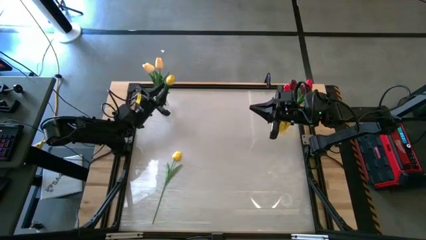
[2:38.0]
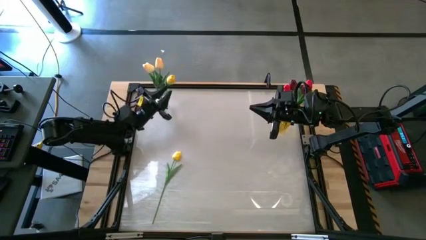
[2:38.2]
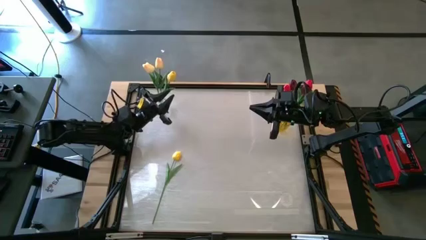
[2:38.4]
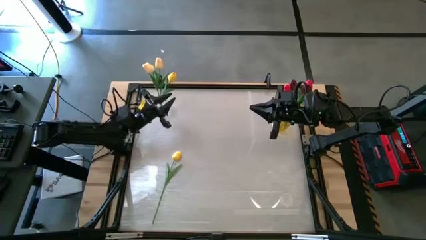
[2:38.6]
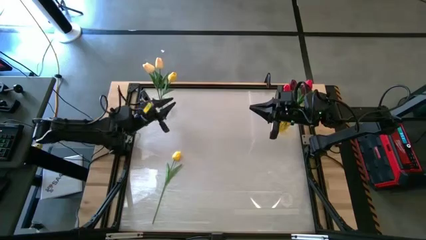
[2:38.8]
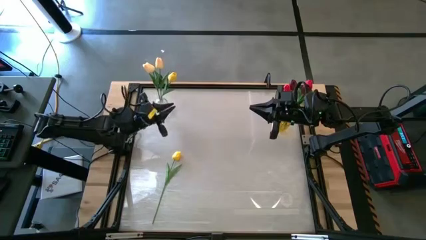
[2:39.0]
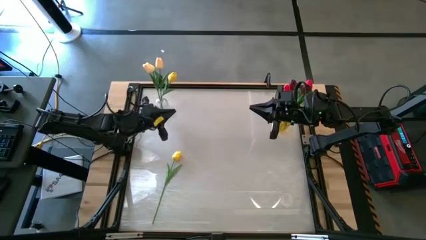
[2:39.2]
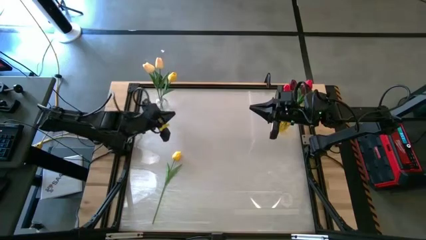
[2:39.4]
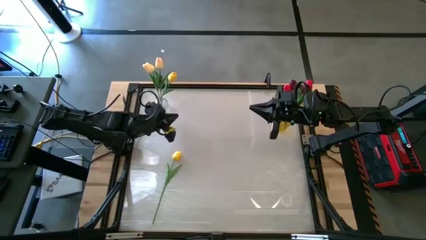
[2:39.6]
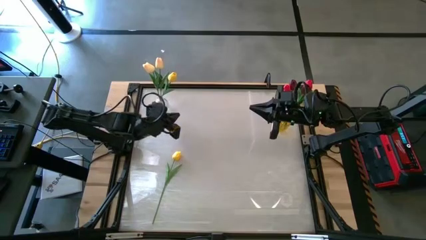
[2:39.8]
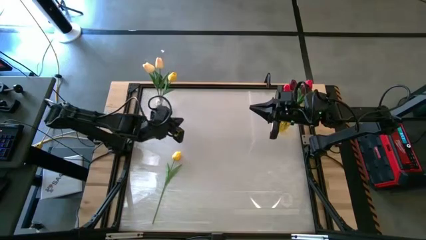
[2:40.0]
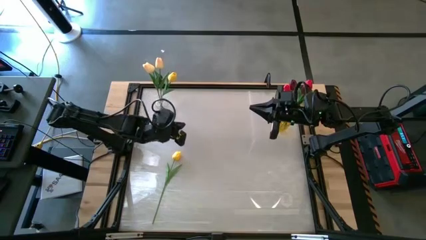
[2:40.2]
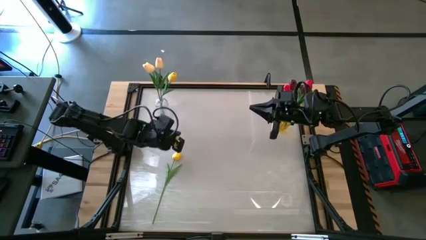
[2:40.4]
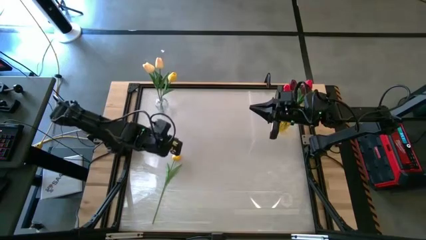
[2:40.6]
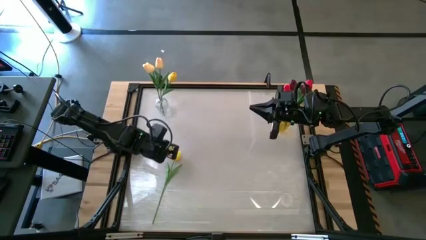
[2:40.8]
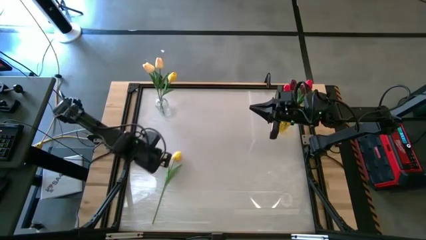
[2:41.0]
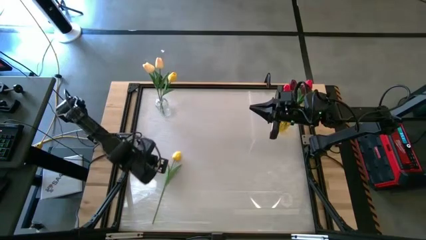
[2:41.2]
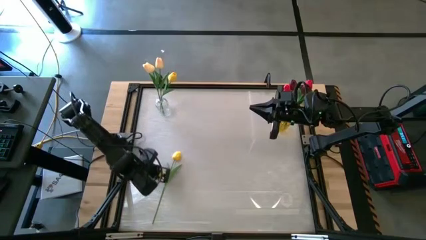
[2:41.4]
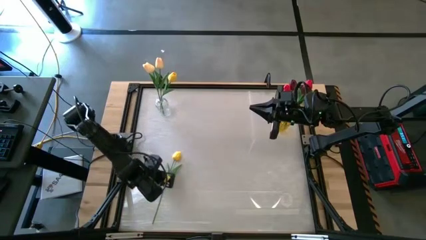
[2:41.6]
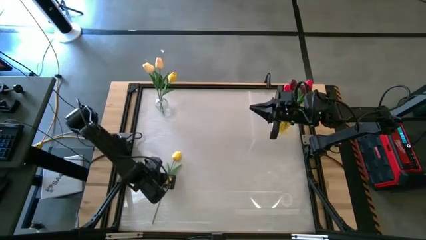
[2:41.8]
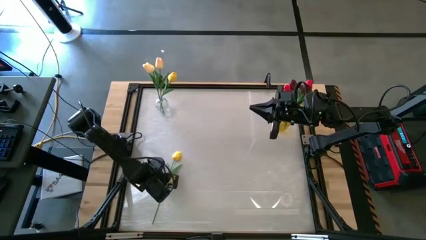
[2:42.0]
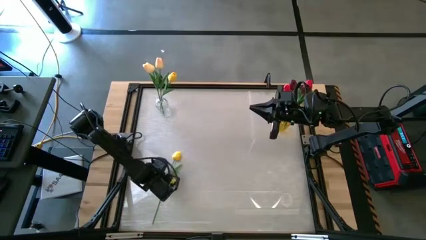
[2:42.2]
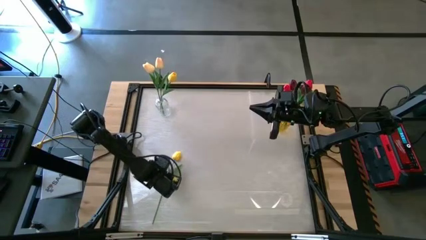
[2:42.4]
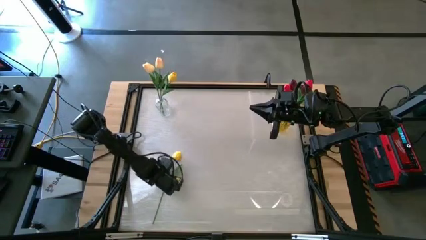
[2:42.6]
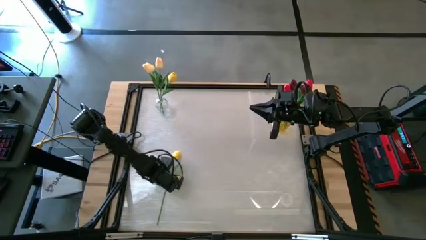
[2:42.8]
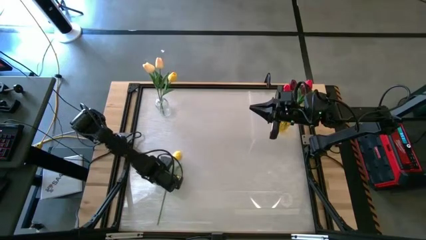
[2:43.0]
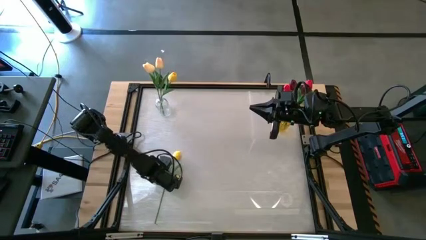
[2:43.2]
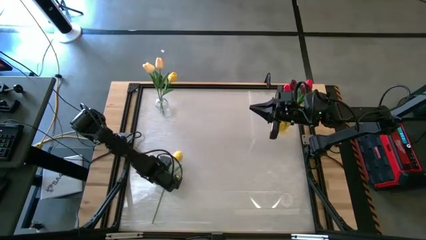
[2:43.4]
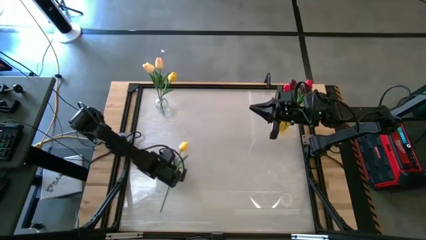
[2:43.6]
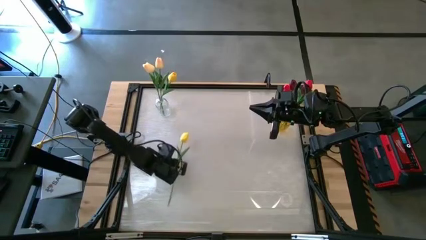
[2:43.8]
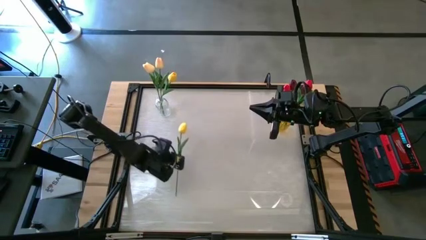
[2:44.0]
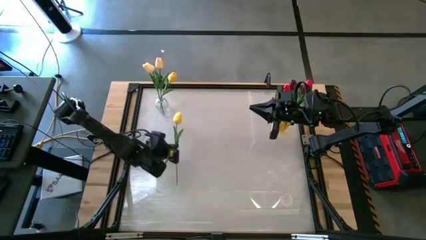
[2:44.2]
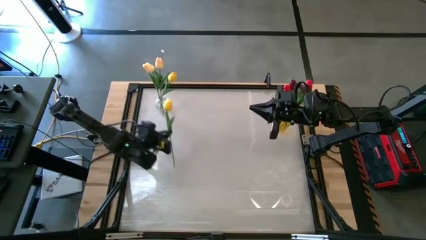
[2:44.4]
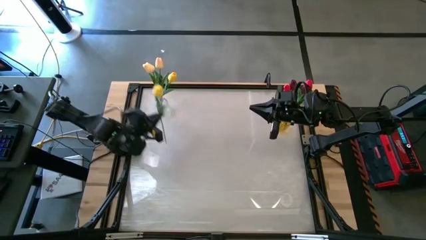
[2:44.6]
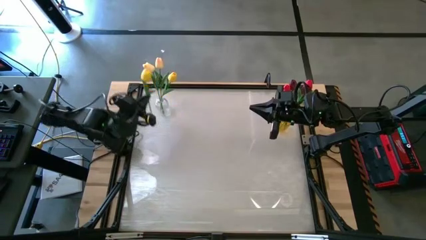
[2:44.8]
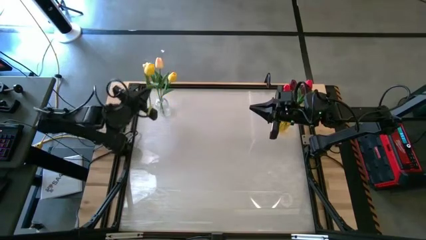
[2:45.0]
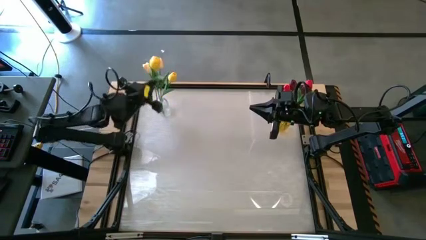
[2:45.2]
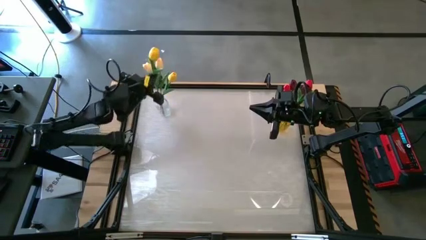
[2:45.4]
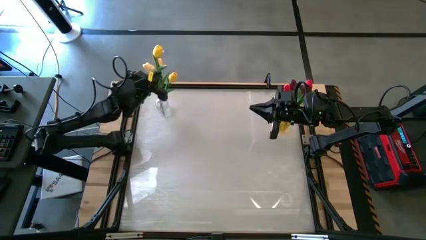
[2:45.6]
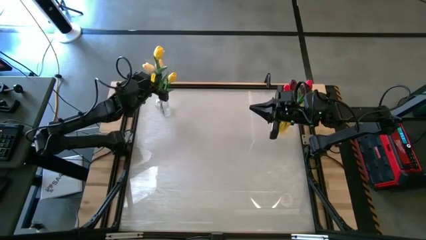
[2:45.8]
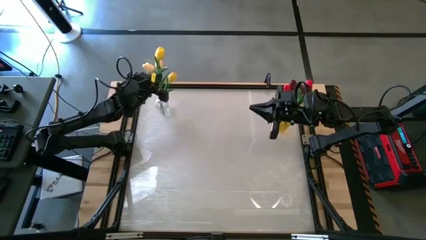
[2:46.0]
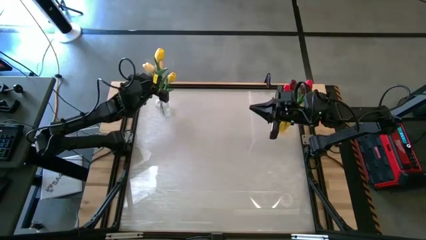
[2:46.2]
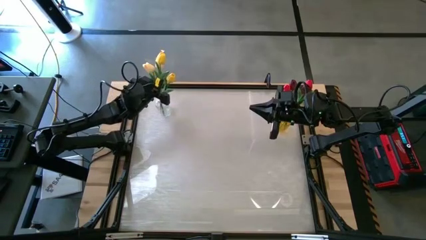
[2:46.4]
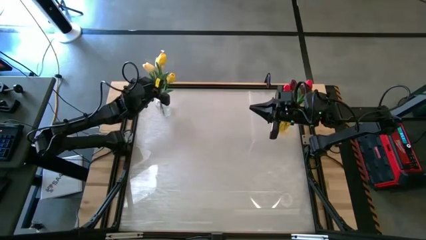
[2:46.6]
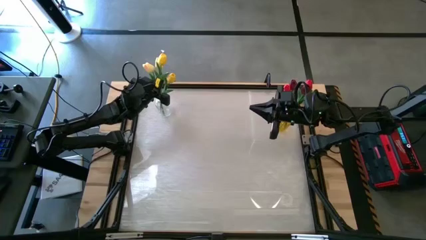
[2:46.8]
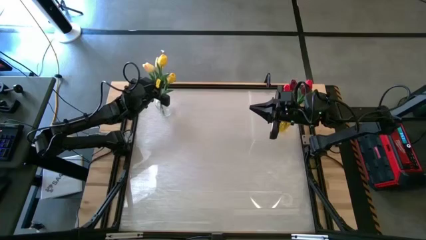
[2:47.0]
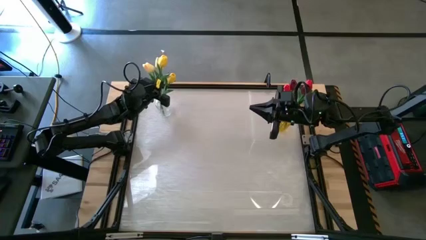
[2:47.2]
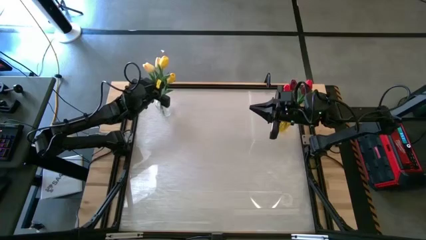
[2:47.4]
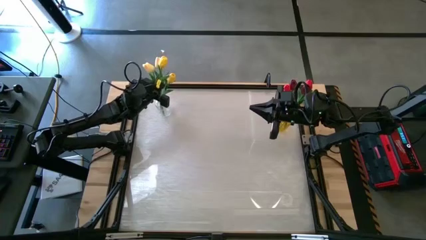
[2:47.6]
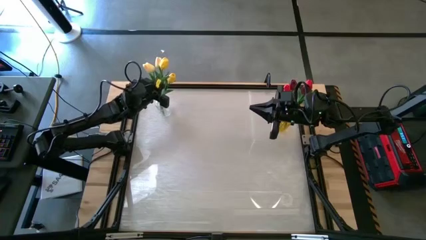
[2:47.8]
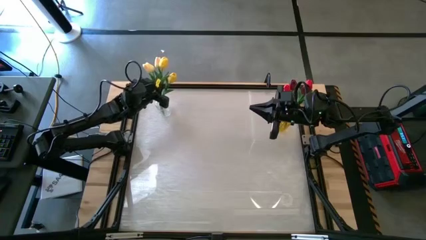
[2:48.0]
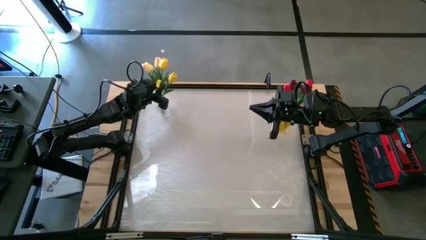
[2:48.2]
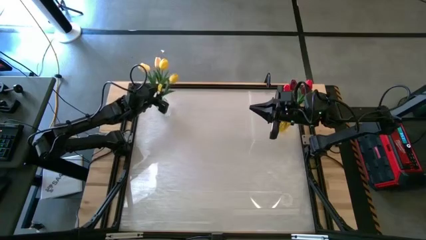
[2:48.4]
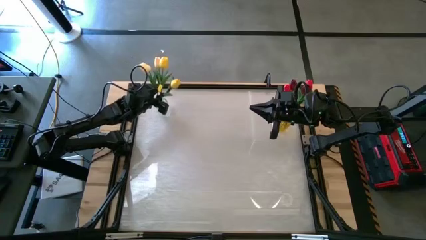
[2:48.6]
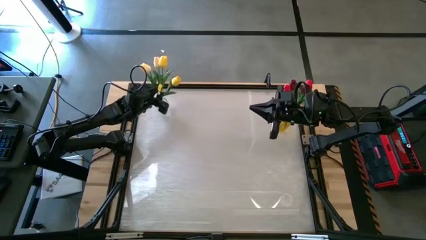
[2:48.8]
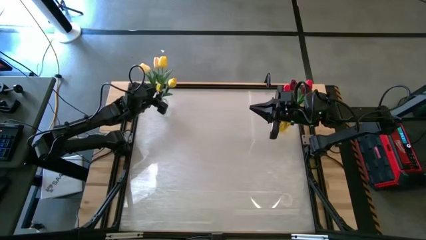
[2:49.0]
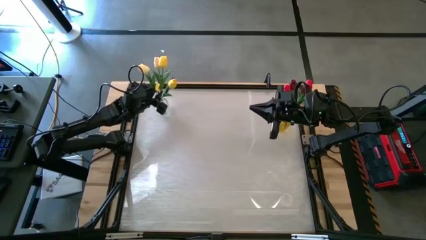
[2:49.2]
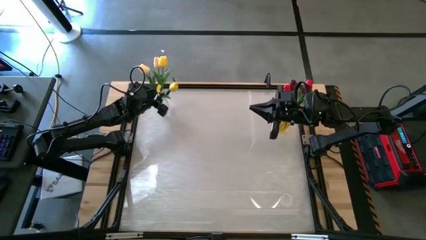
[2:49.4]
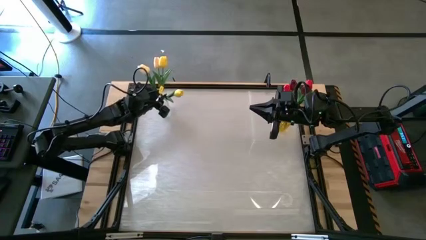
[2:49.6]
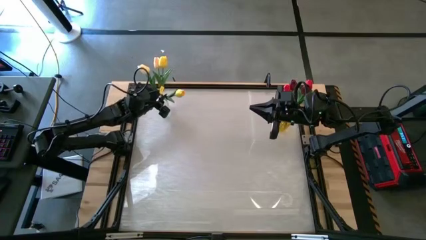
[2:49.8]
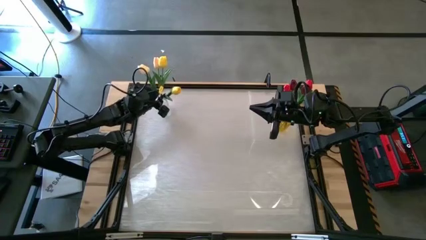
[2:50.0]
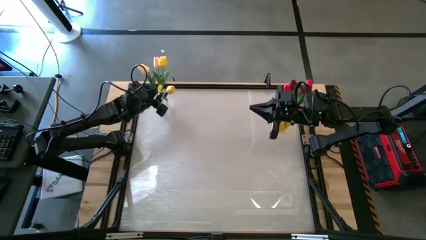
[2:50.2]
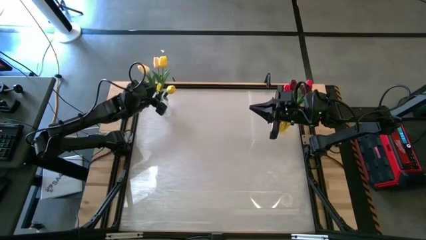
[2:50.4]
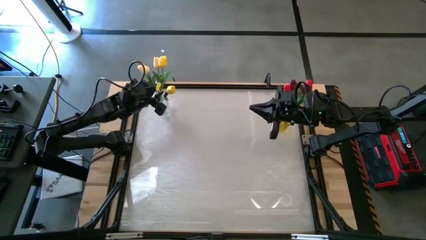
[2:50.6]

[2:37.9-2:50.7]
Task: Sort flowers into vase by color
Put the yellow tulip into the transparent vase

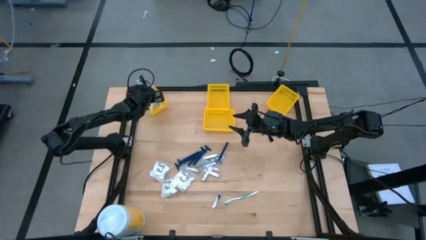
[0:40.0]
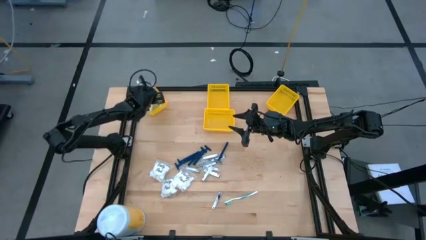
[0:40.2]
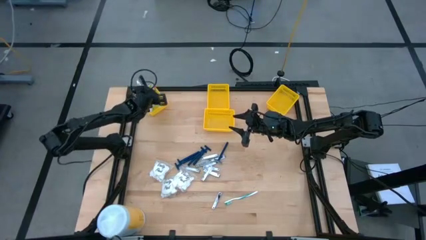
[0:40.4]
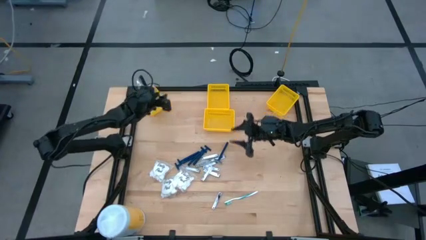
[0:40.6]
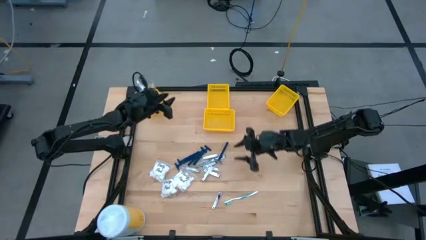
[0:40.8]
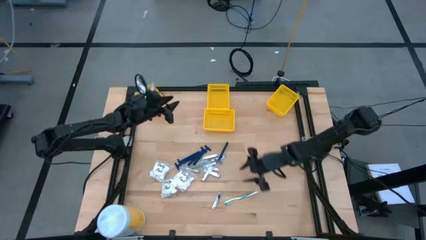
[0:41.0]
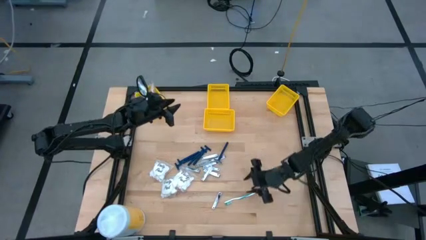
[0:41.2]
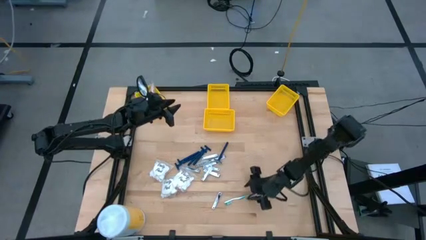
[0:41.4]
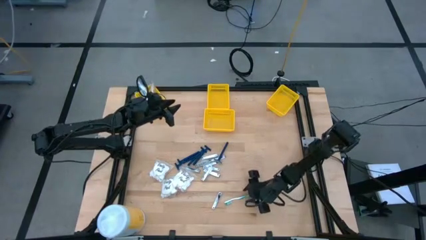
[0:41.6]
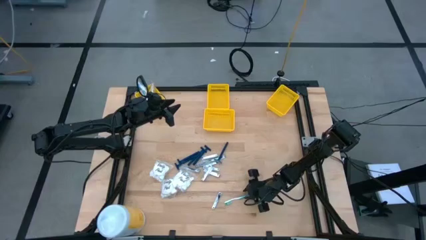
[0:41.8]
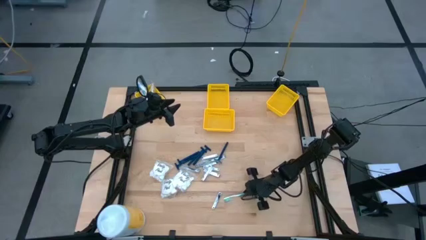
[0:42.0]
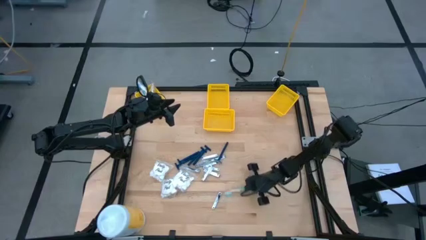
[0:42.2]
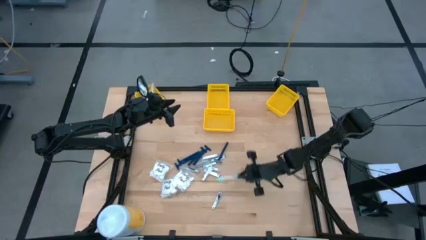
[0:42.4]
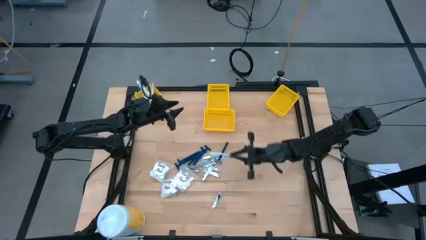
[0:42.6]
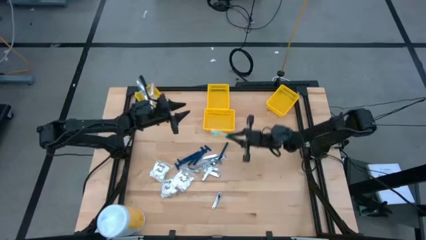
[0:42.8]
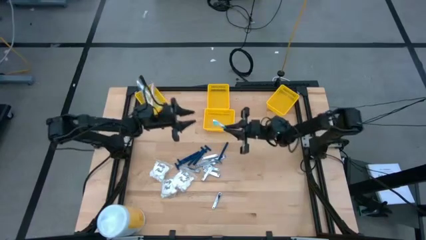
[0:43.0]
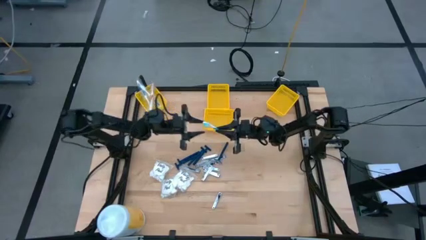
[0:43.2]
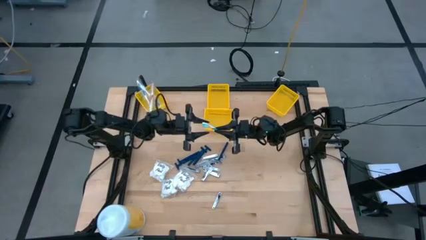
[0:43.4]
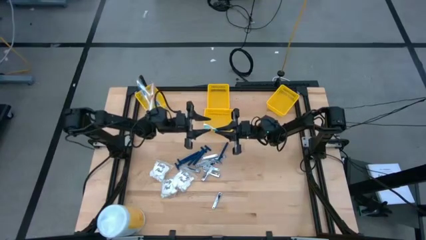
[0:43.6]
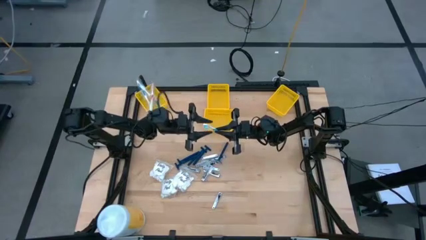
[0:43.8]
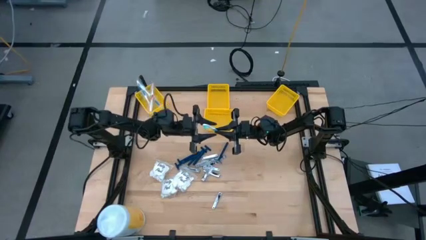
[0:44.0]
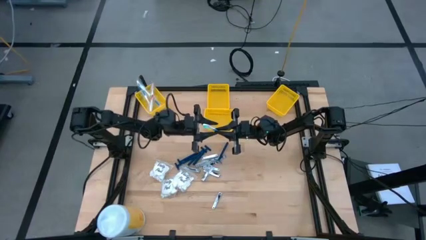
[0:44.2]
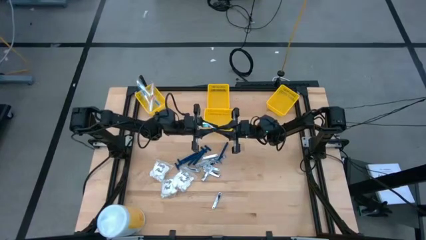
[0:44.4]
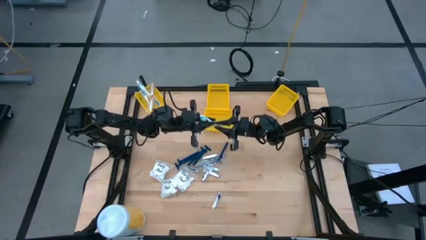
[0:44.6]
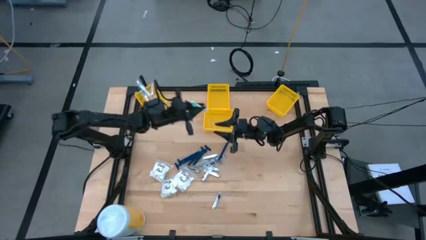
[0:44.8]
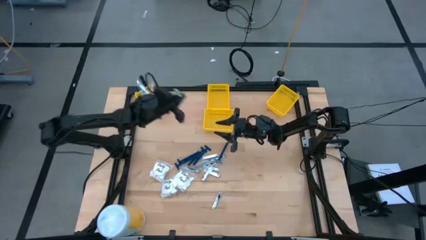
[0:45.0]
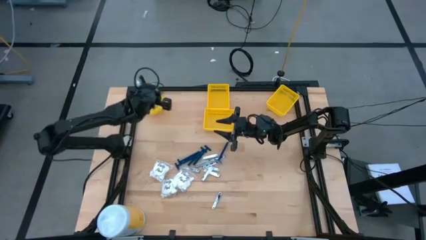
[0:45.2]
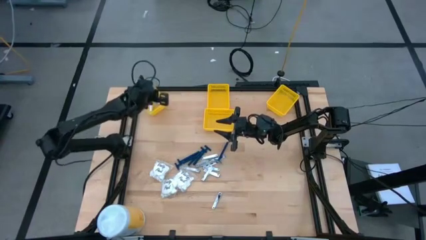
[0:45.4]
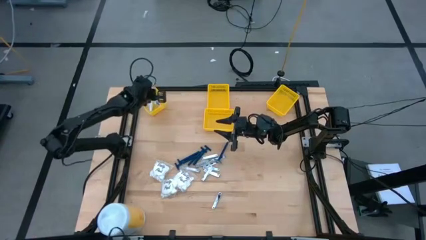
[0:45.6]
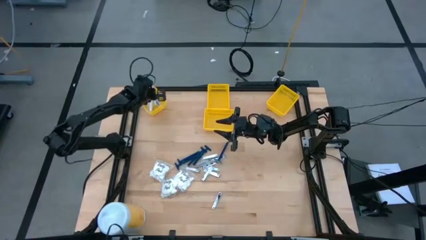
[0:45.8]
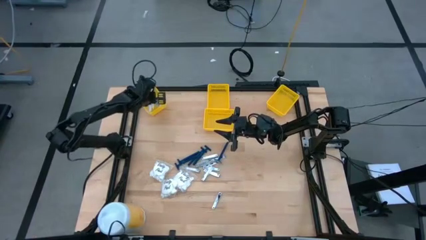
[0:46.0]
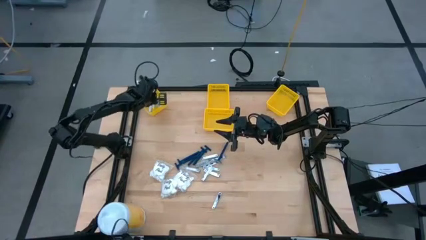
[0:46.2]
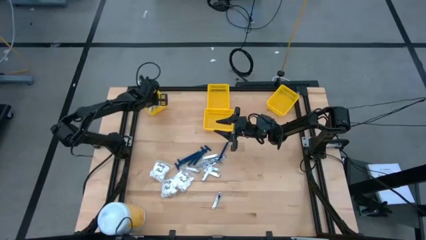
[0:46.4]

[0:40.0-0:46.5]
Task: Pick & Place Travel size toiletries
Put the green toothbrush into the left yellow bin
